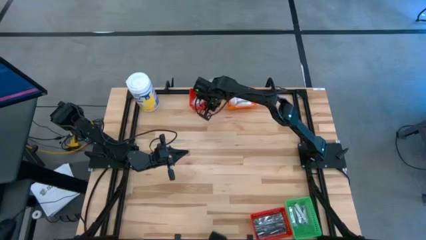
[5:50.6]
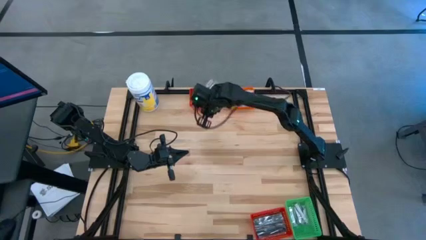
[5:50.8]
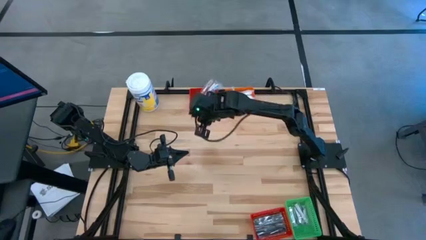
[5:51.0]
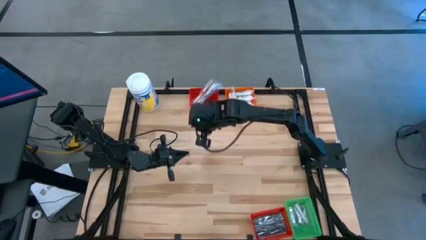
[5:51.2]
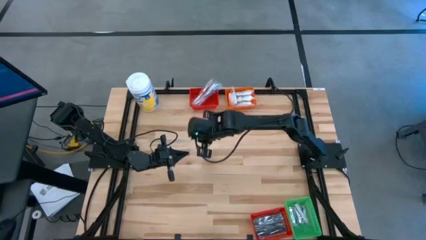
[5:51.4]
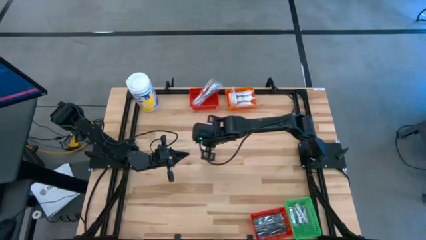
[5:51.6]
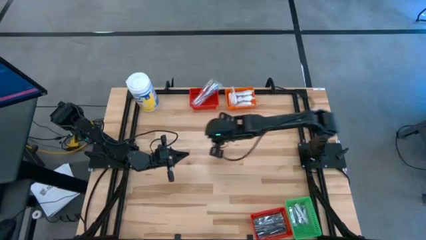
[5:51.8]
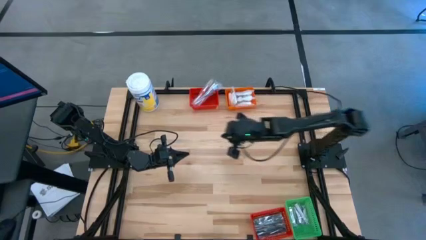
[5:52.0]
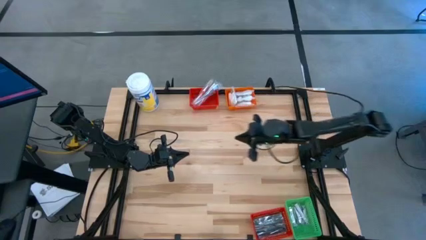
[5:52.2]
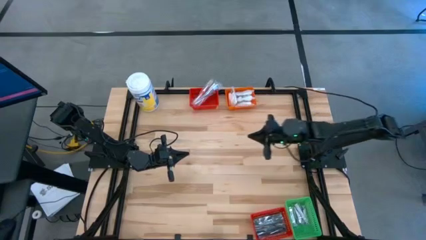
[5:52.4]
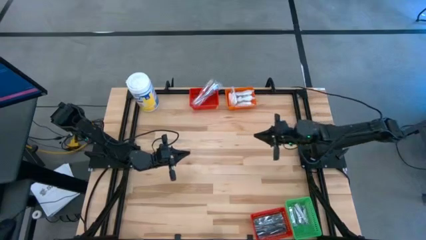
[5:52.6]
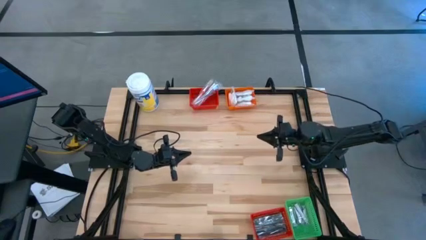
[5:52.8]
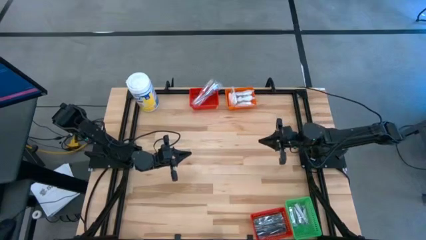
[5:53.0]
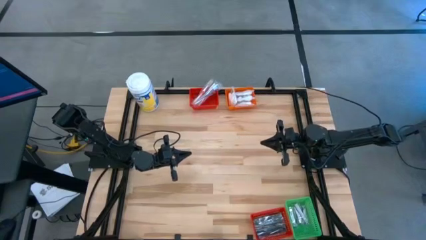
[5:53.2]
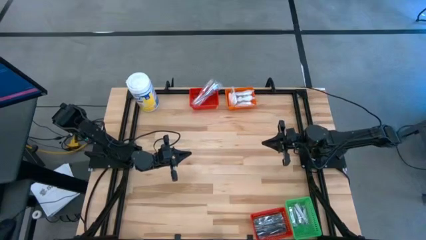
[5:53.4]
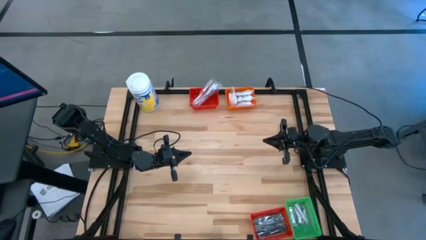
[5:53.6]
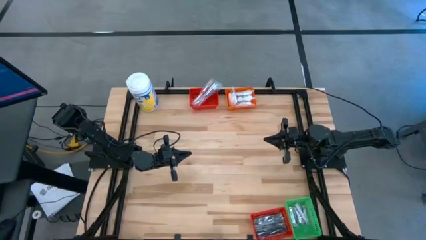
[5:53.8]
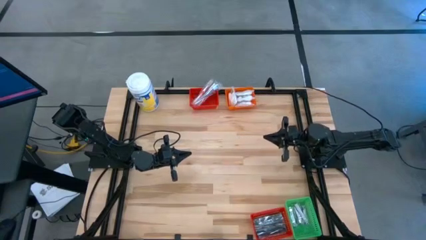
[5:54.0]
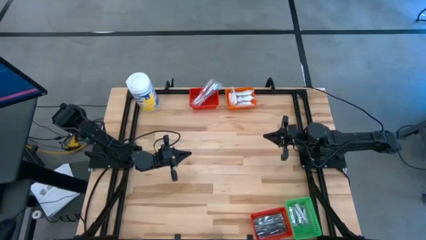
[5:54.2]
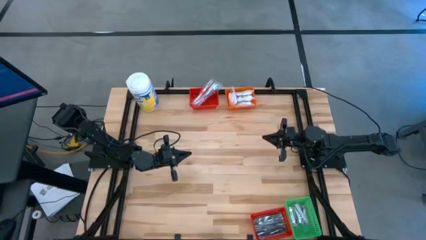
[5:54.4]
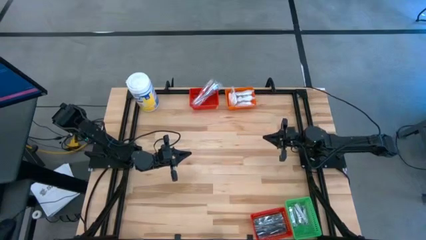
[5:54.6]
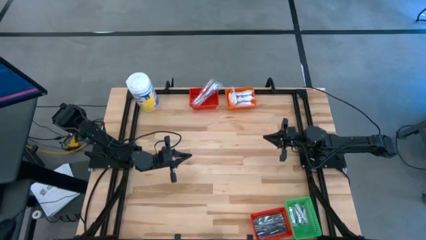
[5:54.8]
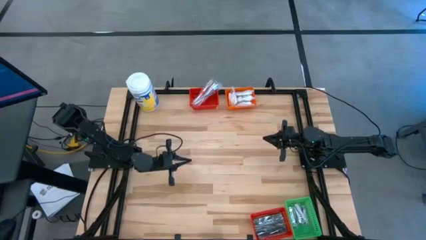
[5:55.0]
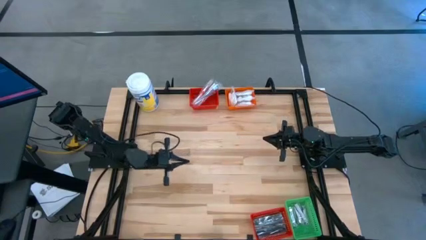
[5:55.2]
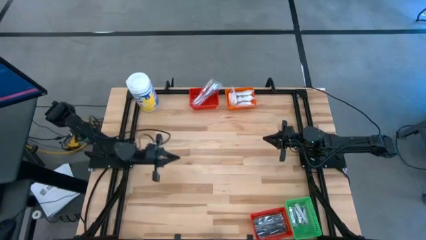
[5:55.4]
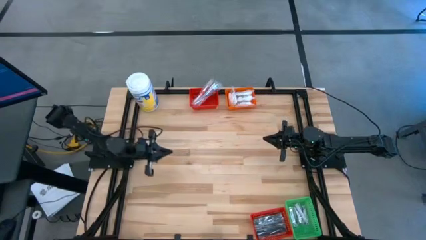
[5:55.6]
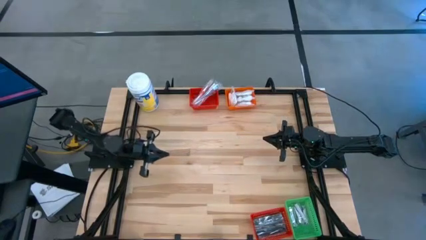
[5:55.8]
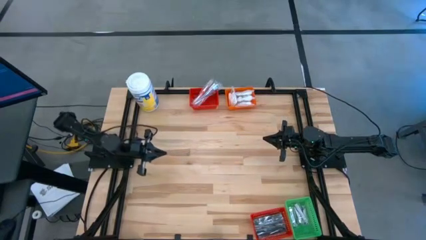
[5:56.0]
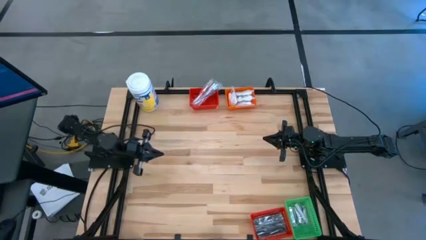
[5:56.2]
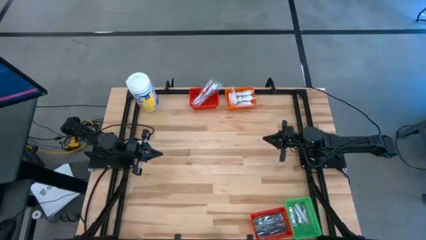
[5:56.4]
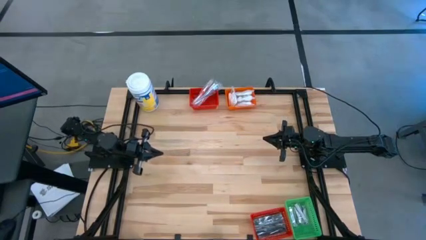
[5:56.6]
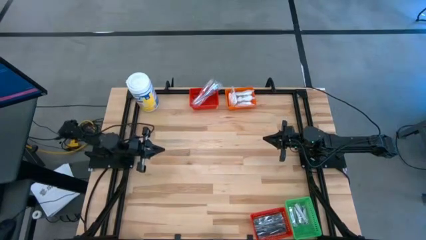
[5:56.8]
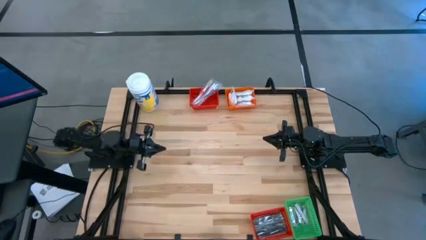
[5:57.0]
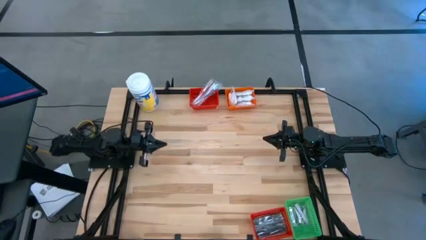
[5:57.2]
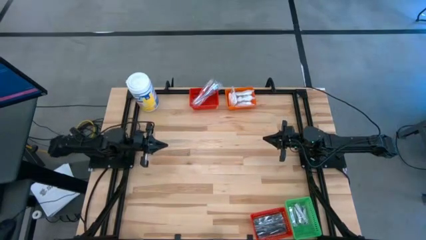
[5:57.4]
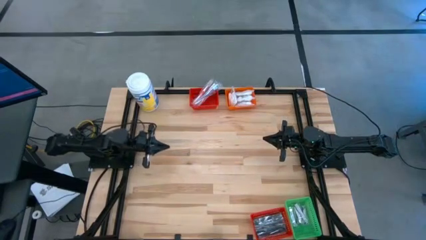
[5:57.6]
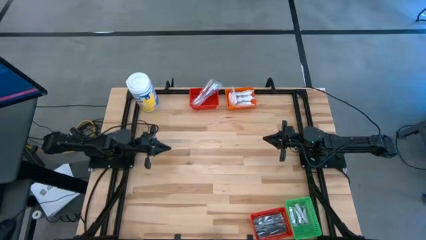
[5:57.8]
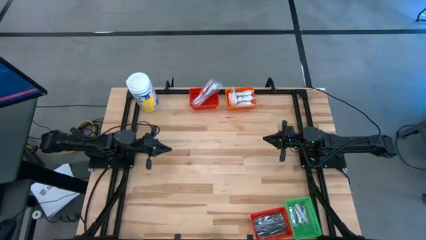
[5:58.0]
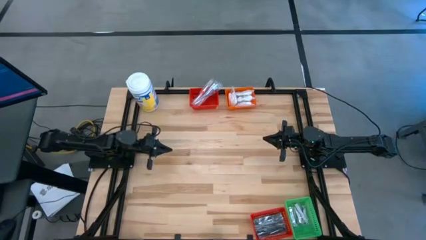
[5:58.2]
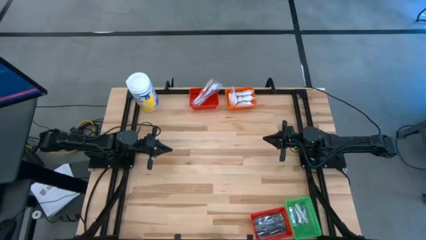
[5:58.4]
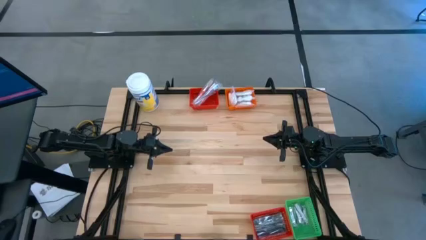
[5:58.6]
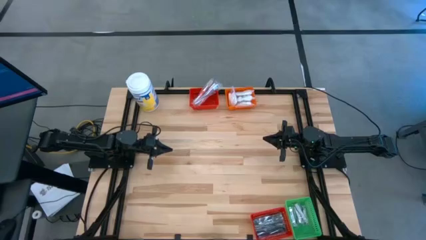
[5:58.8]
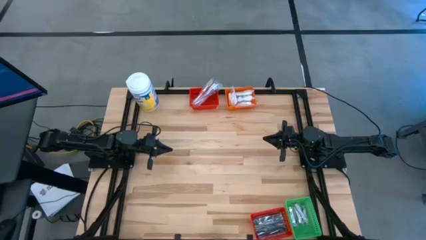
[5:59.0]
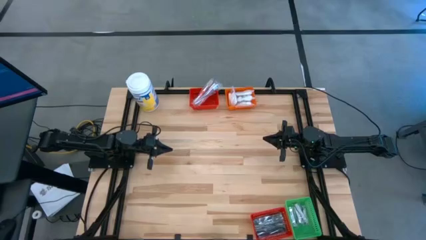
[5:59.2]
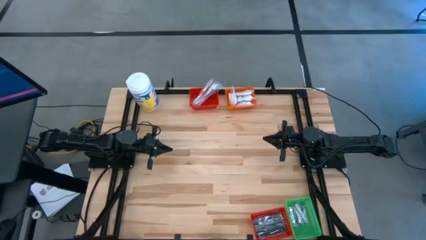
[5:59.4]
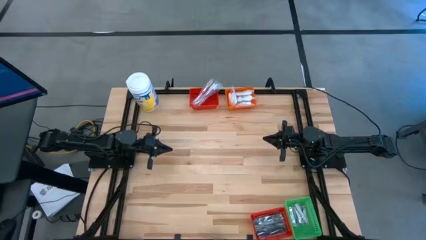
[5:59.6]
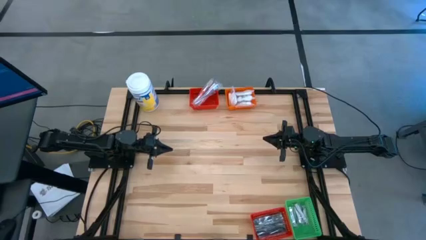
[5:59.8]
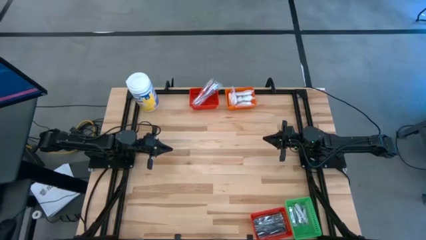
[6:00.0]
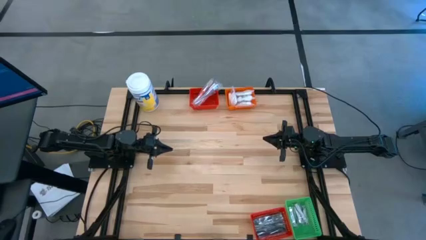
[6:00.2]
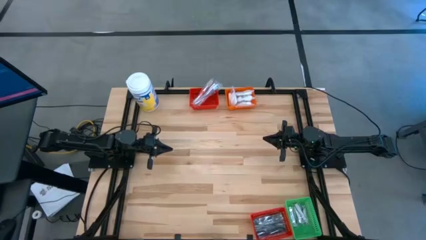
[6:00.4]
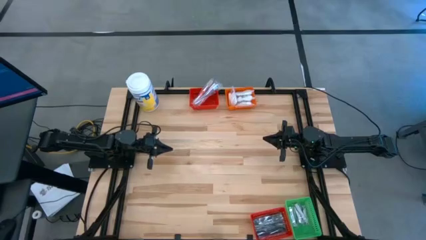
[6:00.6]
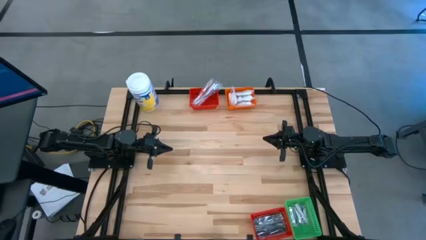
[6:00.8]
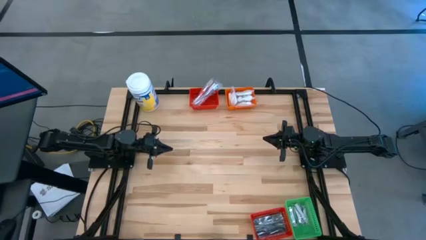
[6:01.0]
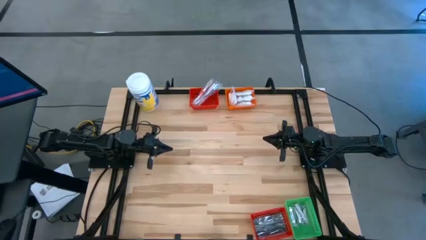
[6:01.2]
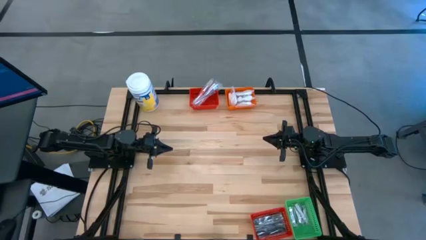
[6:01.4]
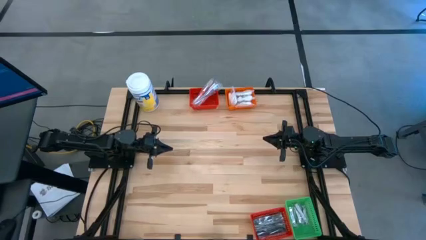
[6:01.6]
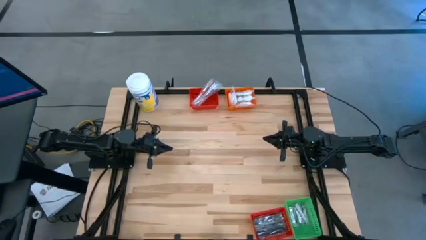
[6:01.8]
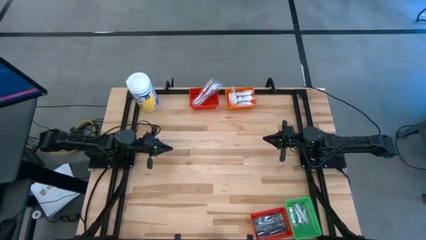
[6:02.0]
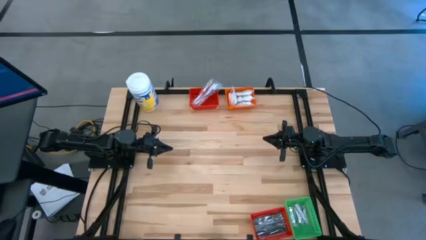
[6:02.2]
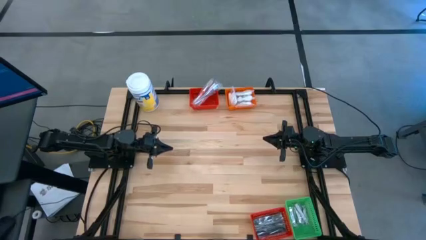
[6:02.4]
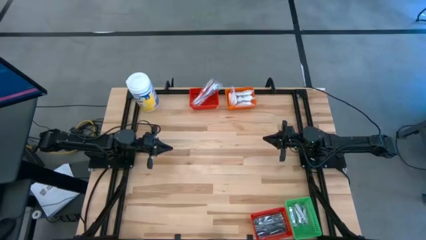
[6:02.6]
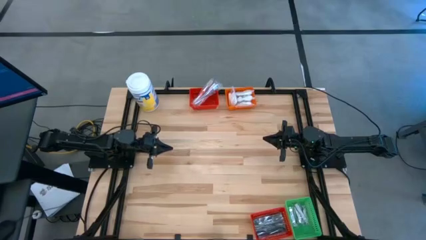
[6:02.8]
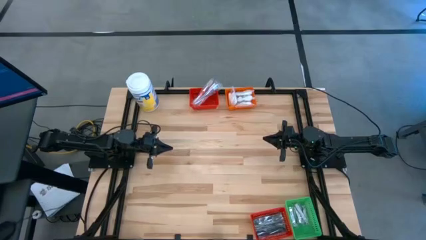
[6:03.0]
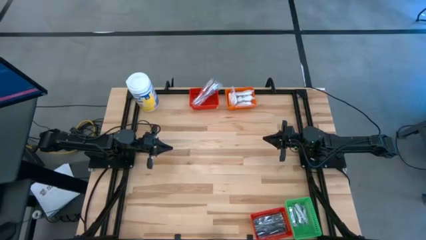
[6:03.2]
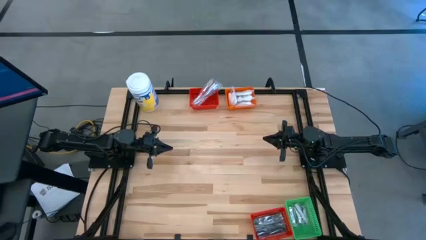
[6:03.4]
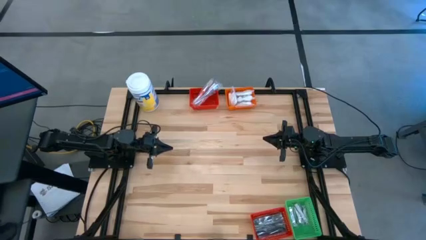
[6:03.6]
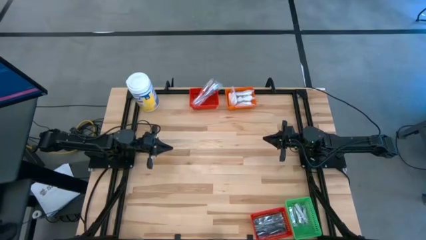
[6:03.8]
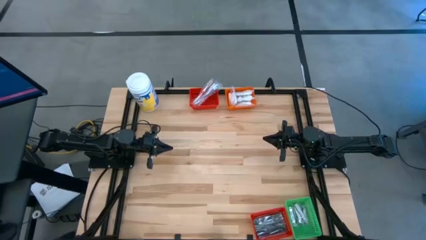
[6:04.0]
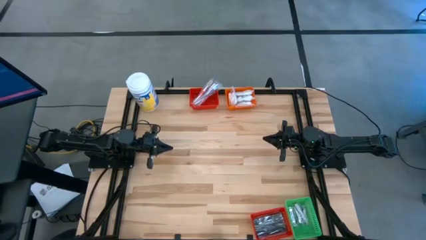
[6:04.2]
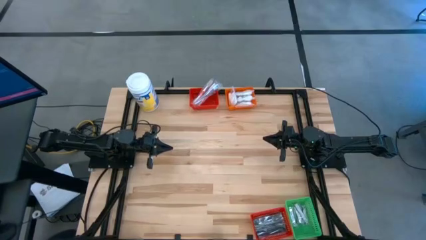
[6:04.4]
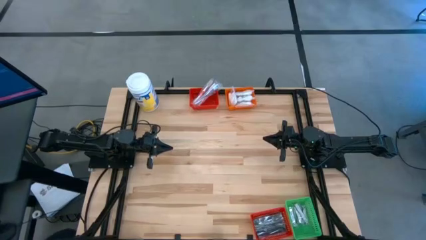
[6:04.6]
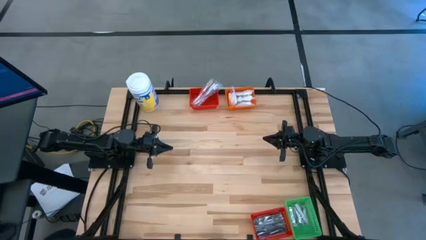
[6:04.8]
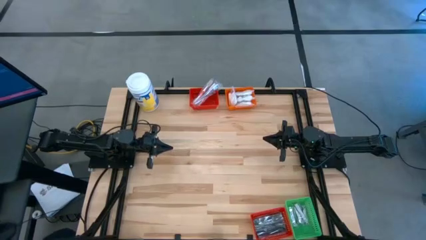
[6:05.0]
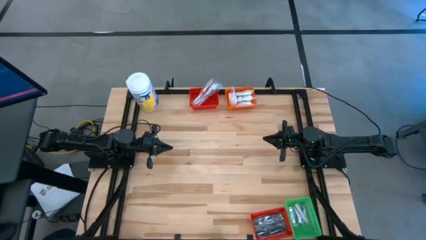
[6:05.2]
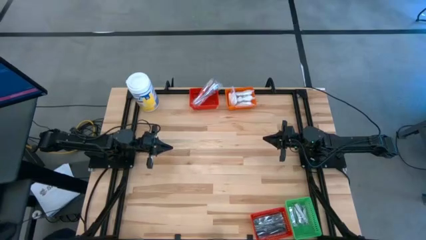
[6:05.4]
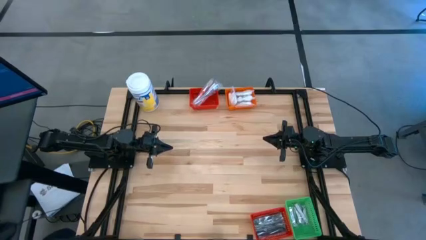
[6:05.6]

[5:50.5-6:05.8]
Task: Pick & Place Travel size toiletries
Return to Home Position
